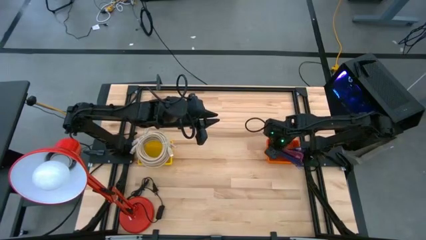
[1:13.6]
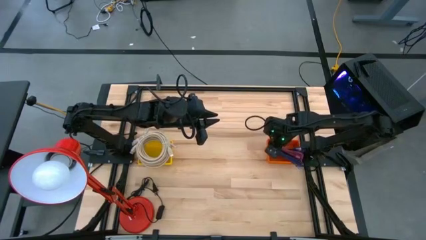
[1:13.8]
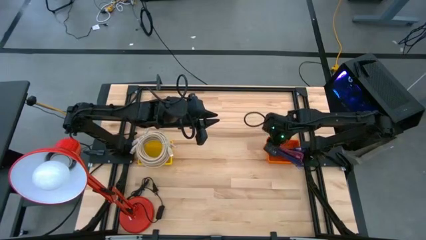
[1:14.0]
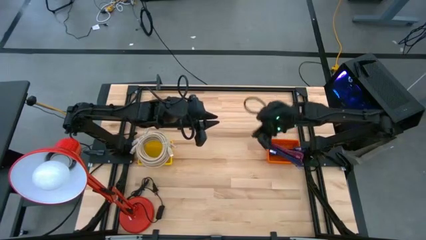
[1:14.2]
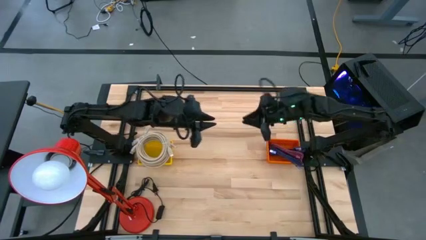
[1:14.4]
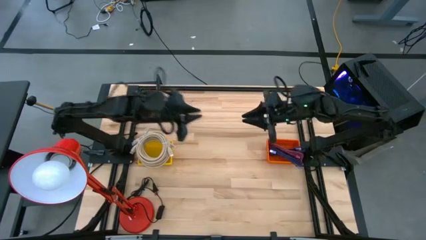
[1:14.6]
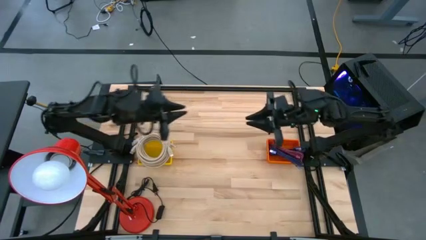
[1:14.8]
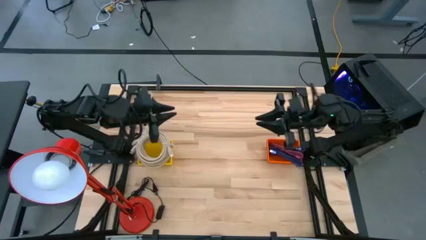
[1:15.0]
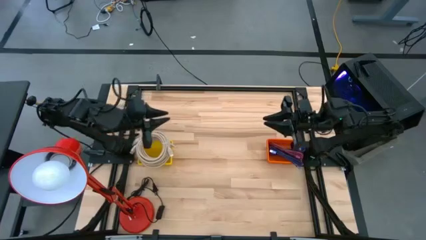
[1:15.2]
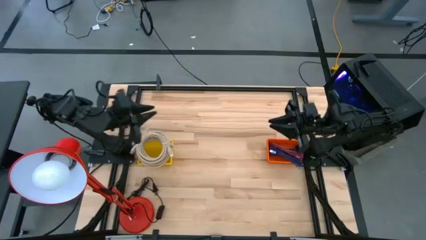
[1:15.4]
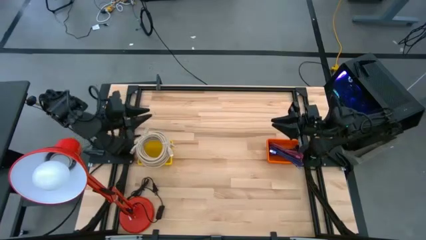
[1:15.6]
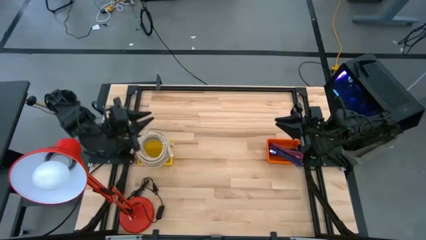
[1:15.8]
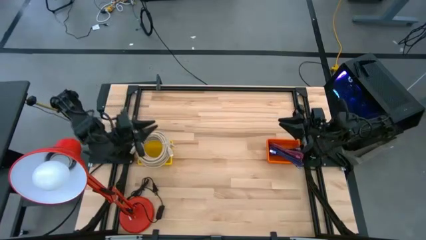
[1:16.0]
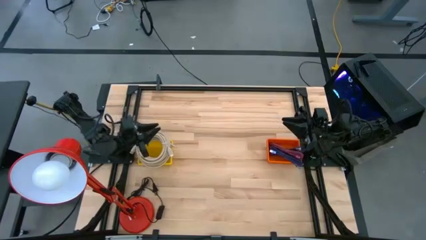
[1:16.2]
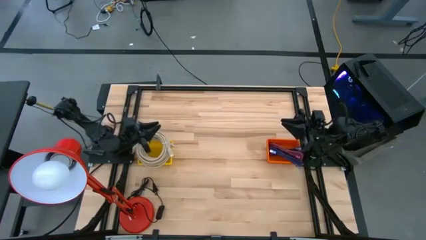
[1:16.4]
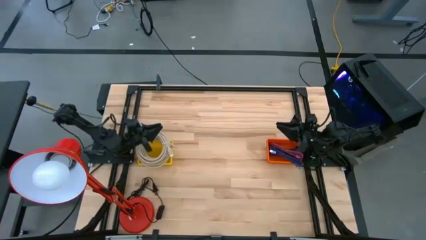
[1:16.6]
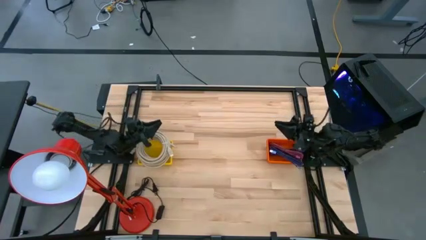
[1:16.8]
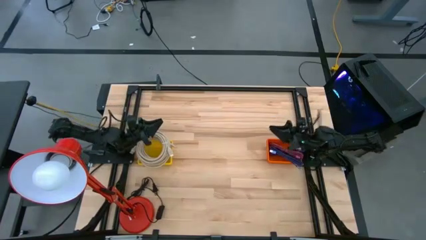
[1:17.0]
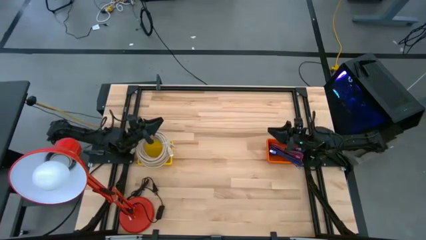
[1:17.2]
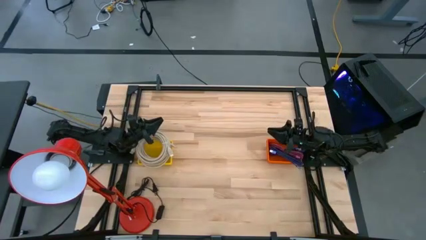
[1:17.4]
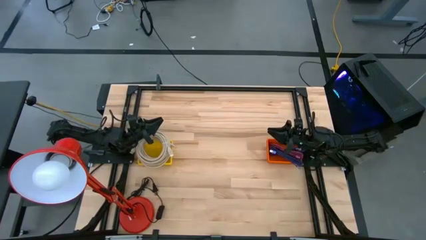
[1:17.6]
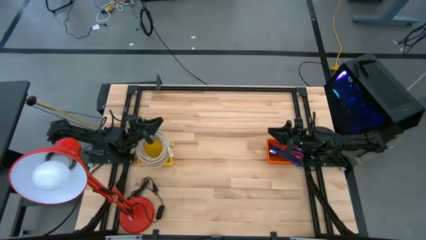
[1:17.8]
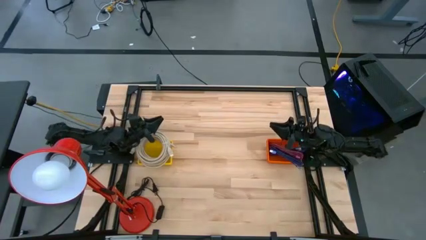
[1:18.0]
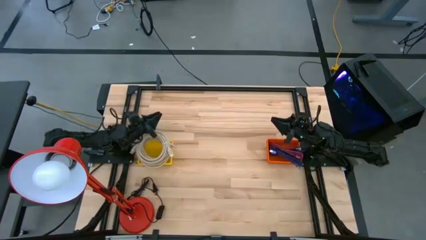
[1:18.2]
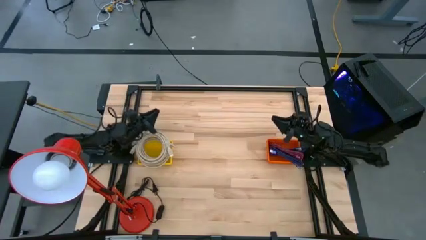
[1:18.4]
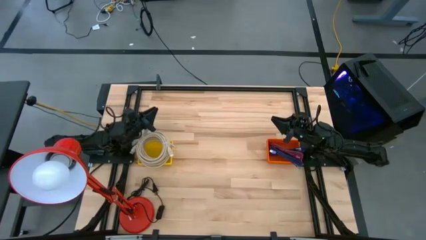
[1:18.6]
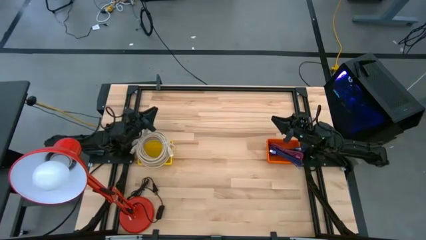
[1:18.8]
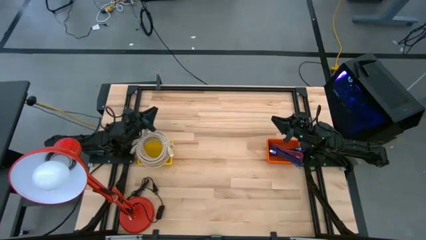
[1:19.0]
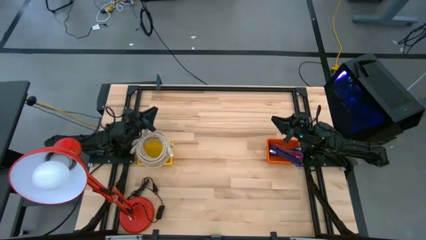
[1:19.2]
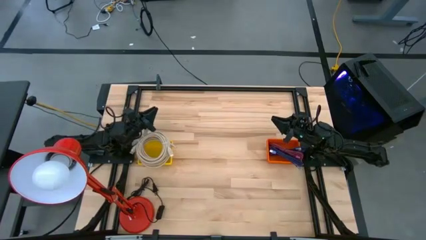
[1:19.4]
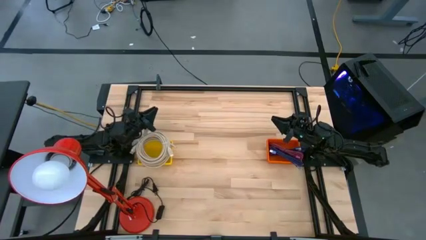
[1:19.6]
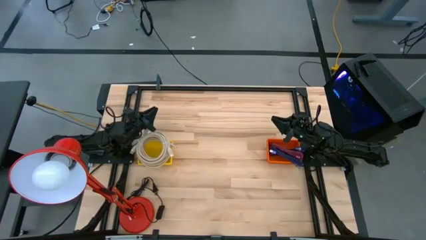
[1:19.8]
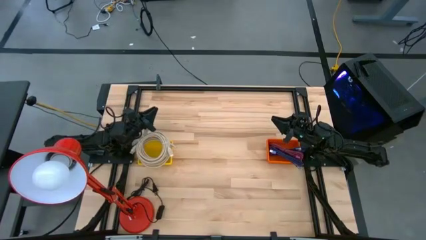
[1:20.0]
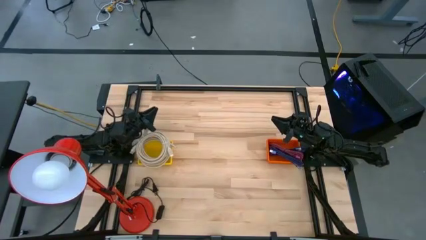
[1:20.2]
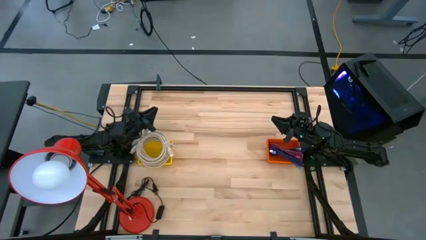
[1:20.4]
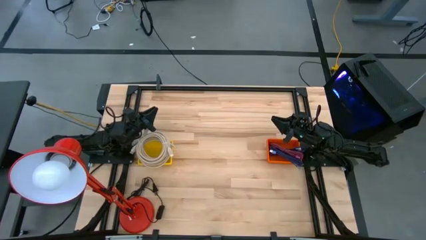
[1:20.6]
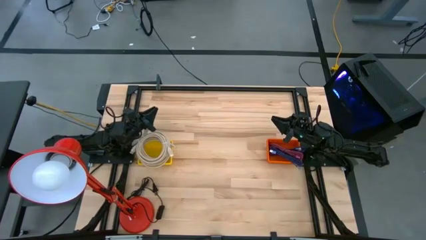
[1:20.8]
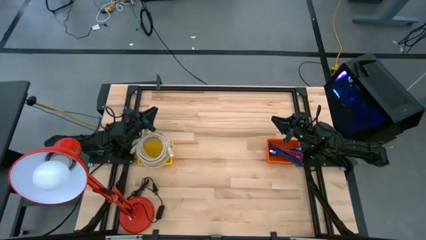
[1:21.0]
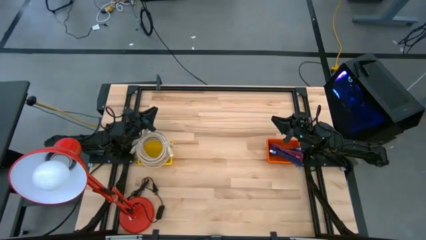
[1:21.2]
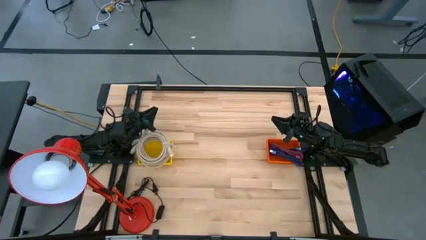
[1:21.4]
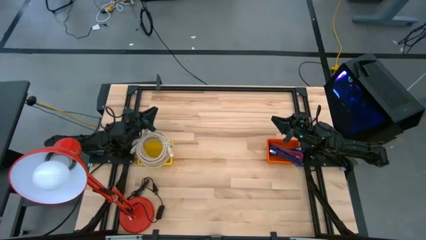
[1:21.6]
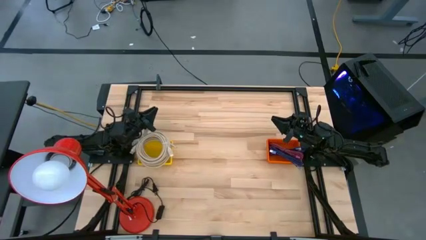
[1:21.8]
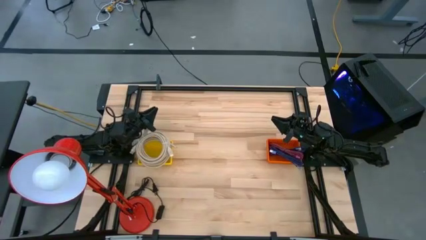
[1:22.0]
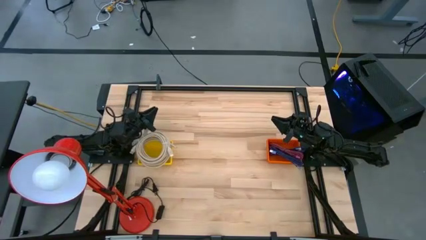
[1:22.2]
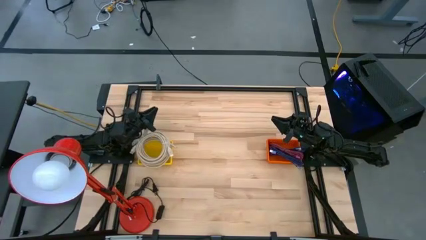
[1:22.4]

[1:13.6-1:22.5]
Task: Pick & Place USB Port
Return to Home Position

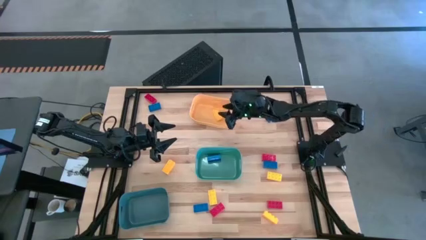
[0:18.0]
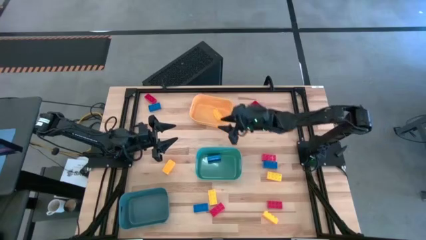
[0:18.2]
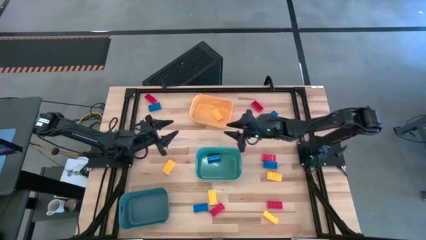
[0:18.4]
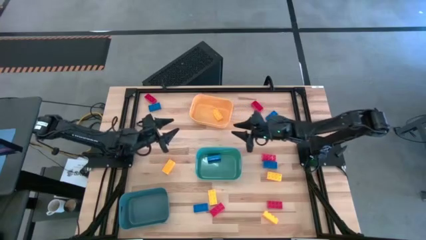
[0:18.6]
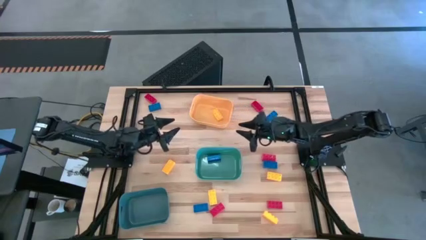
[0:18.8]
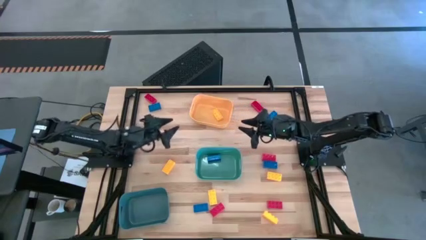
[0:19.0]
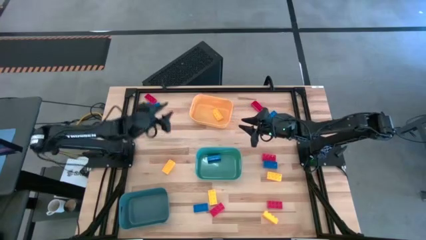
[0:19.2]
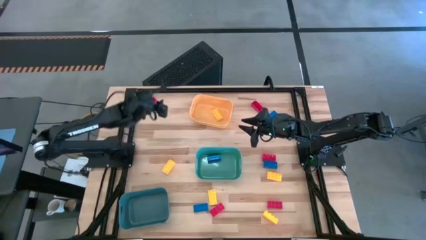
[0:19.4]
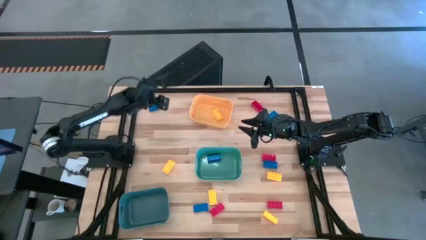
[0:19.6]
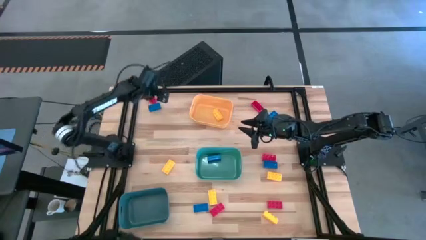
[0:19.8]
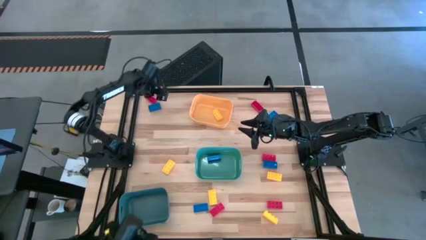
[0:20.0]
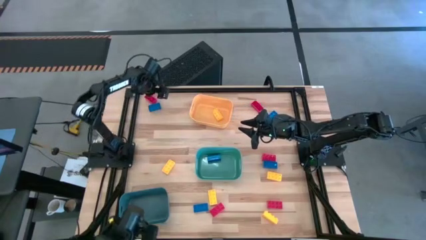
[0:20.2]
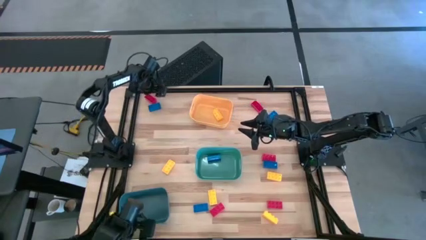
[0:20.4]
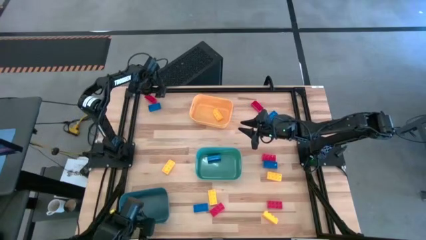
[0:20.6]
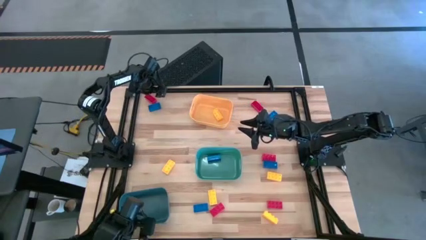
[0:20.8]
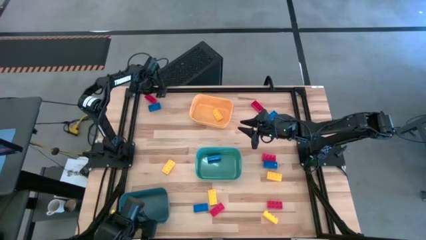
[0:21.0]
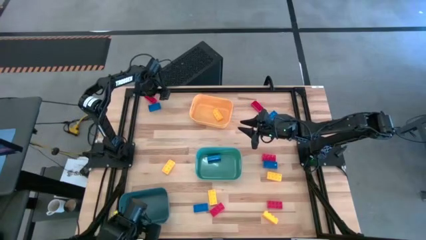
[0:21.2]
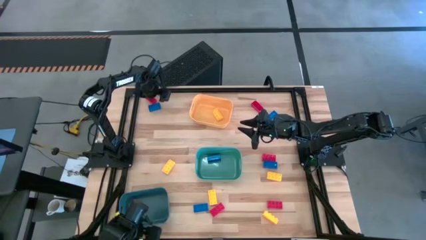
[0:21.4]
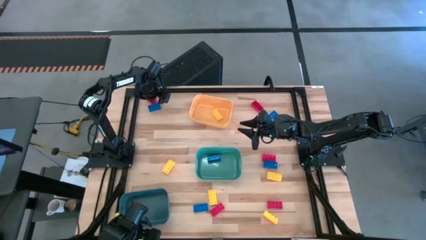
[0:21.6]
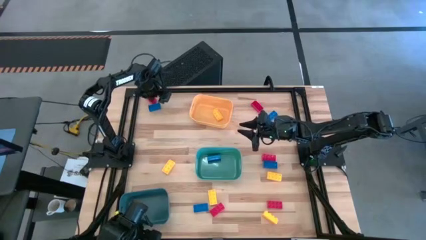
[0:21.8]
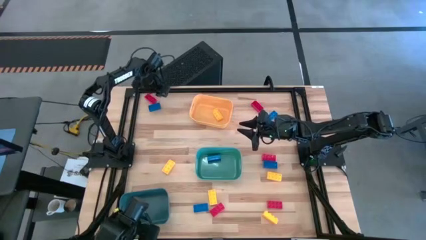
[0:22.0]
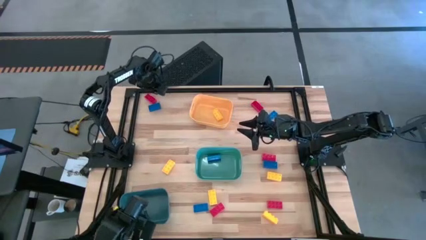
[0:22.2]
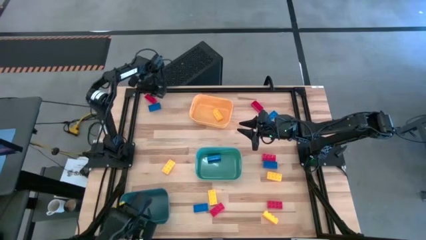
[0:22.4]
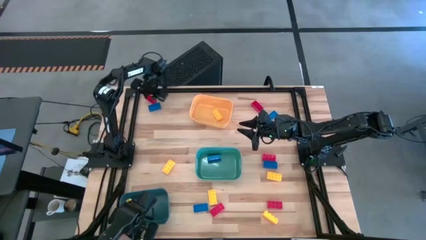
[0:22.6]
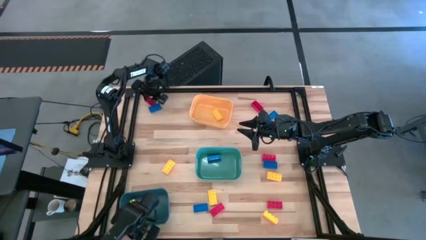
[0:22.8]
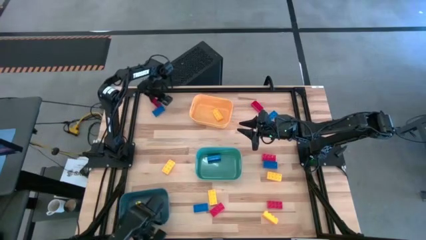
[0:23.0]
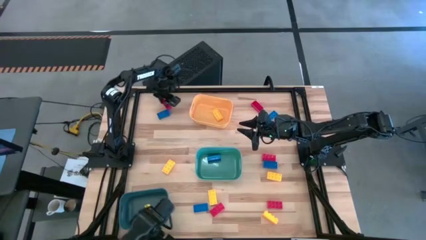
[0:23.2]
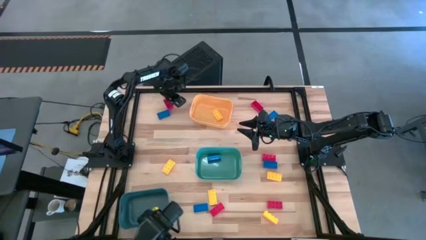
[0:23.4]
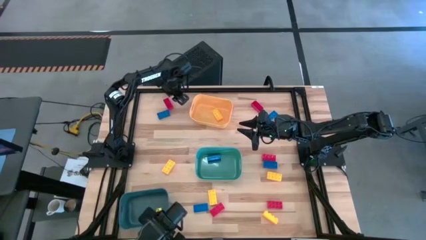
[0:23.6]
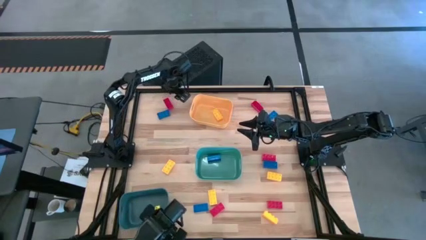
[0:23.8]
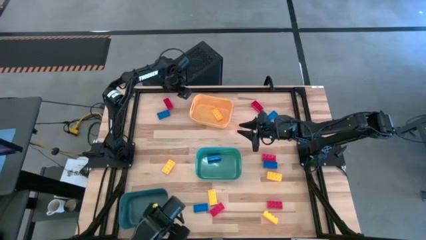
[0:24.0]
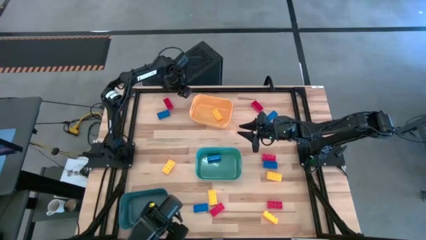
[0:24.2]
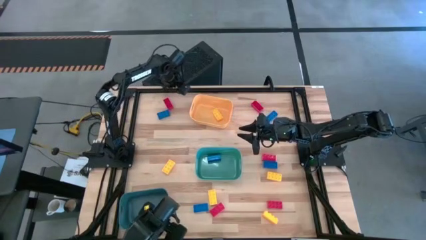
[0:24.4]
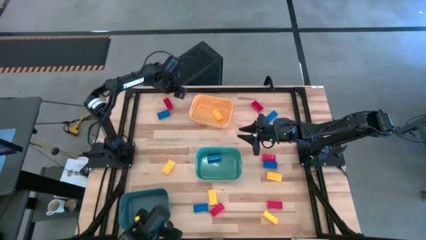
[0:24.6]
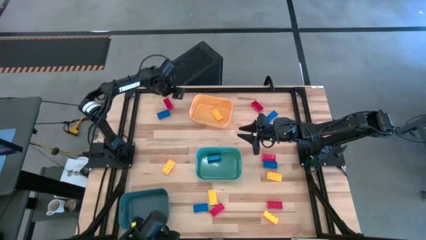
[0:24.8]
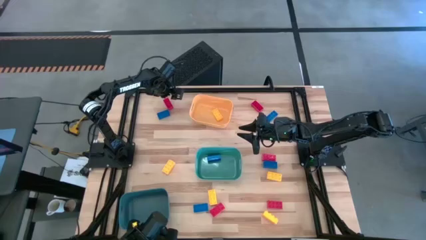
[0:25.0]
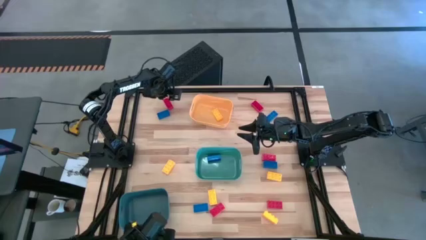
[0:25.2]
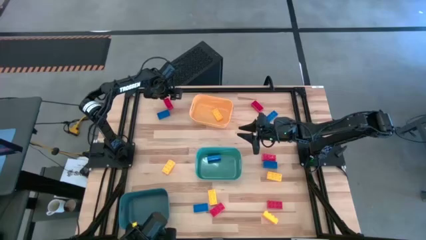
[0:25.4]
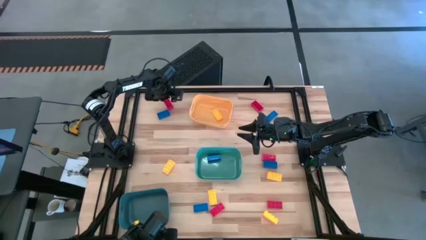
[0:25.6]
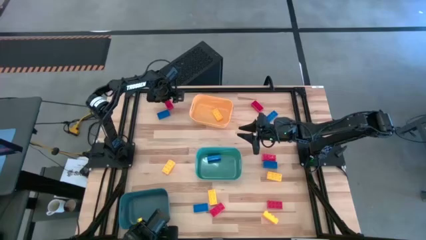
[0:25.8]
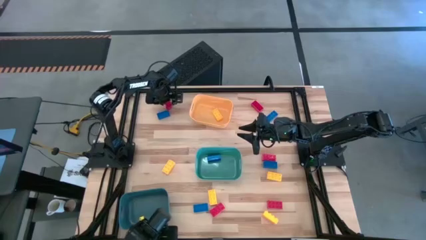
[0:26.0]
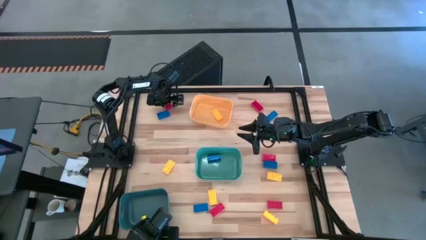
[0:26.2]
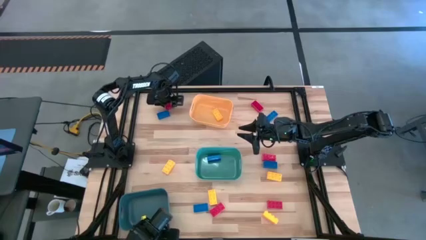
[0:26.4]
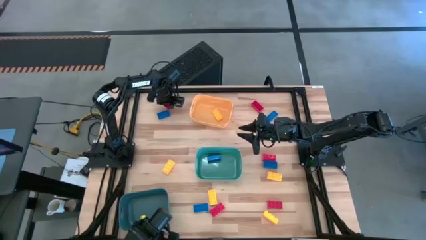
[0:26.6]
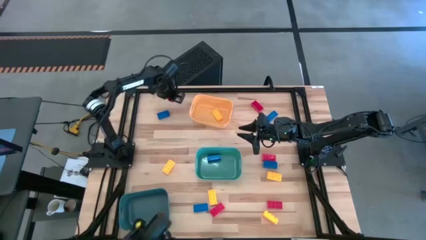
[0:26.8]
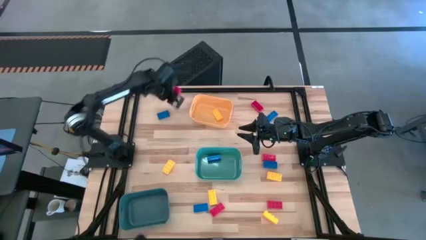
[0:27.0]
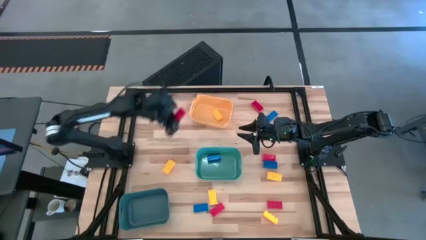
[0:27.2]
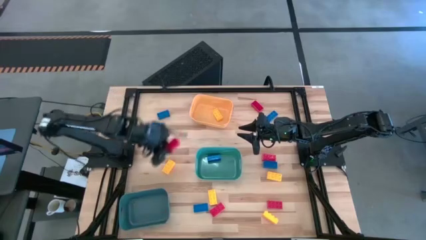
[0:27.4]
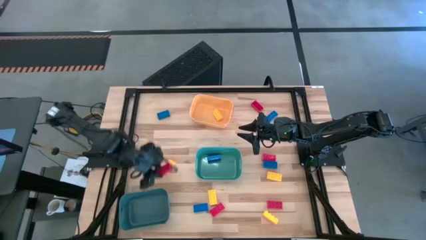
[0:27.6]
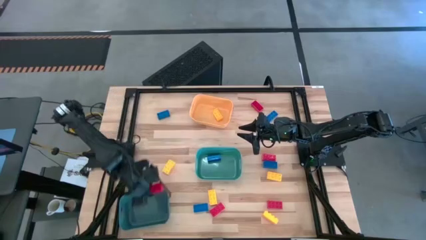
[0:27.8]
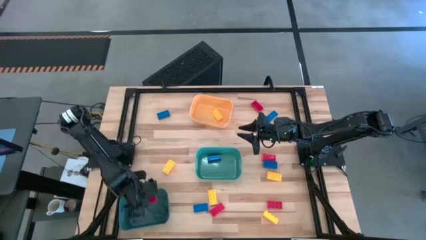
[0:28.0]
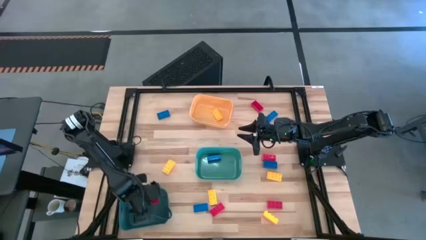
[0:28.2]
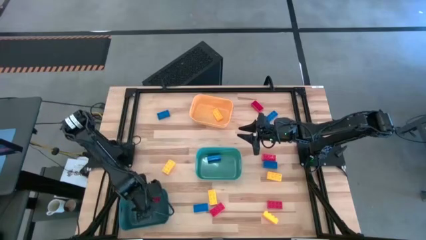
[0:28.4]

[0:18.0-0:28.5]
Task: Sort & place blocks by color
Put the red game piece into the blue bin
